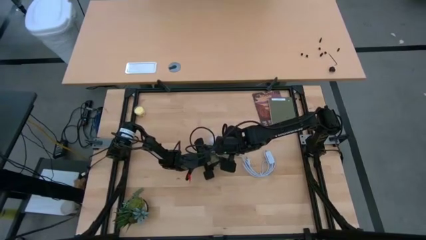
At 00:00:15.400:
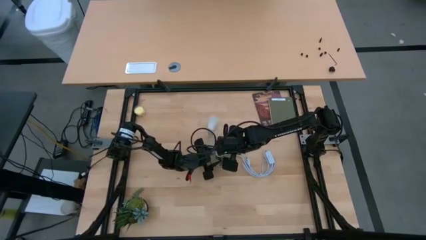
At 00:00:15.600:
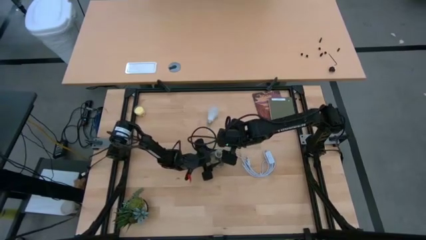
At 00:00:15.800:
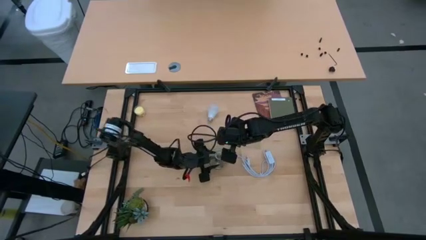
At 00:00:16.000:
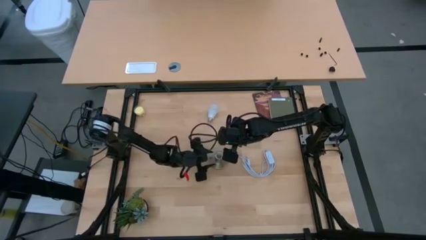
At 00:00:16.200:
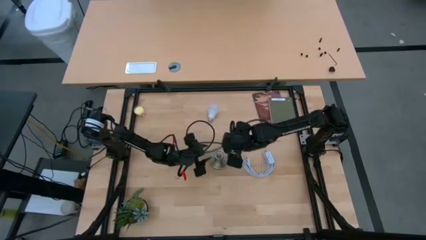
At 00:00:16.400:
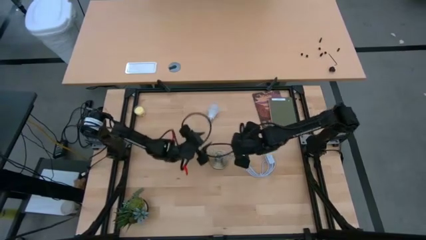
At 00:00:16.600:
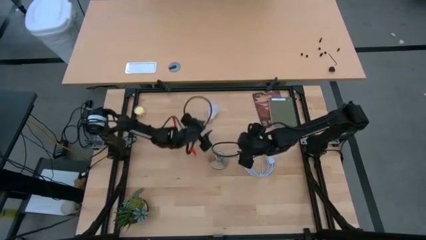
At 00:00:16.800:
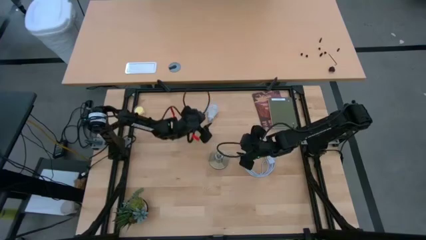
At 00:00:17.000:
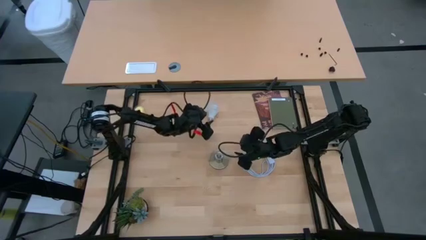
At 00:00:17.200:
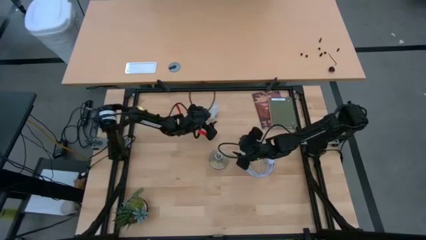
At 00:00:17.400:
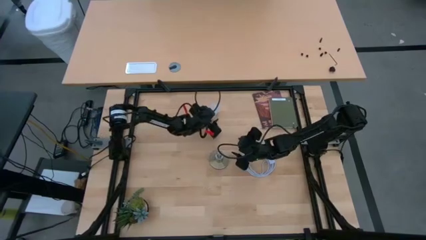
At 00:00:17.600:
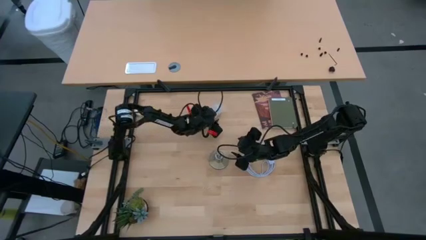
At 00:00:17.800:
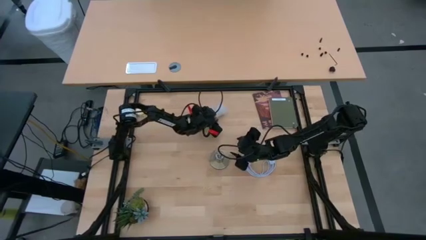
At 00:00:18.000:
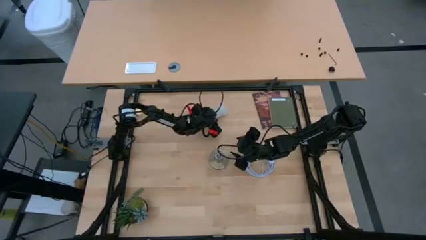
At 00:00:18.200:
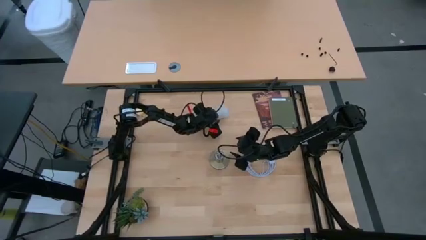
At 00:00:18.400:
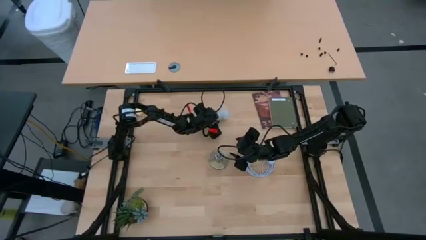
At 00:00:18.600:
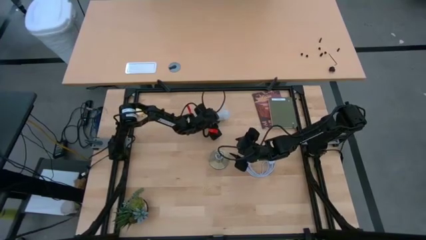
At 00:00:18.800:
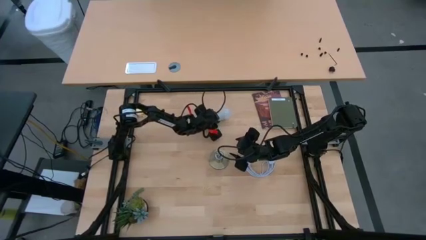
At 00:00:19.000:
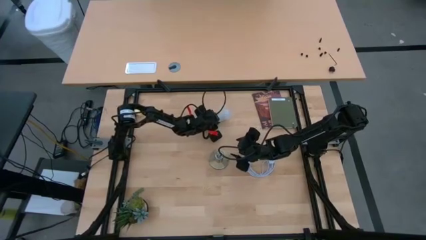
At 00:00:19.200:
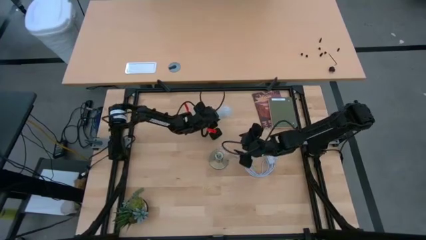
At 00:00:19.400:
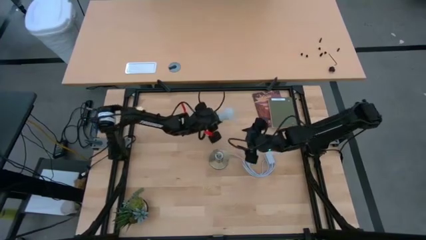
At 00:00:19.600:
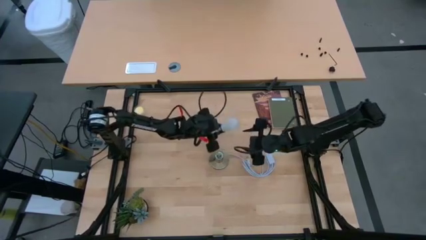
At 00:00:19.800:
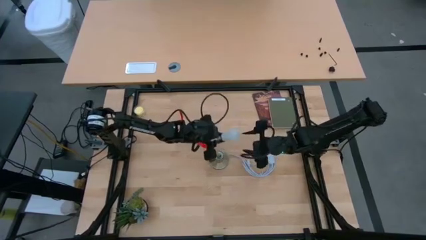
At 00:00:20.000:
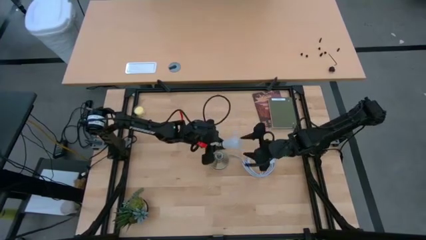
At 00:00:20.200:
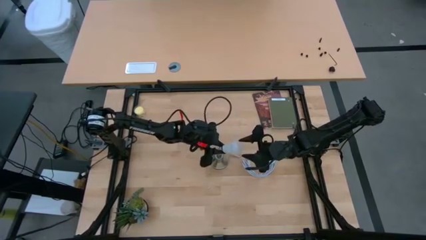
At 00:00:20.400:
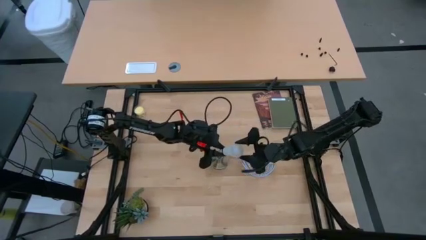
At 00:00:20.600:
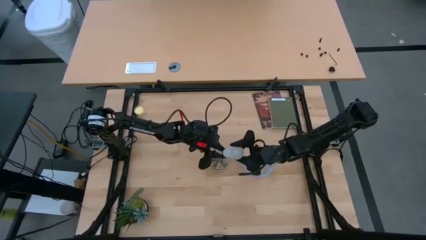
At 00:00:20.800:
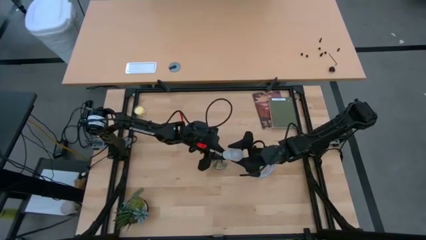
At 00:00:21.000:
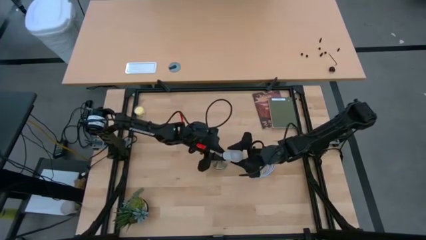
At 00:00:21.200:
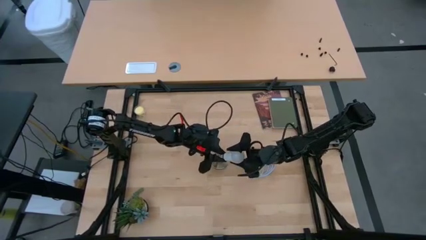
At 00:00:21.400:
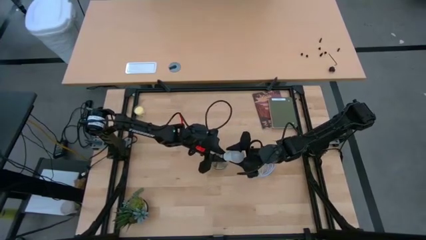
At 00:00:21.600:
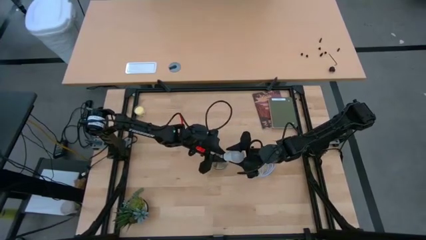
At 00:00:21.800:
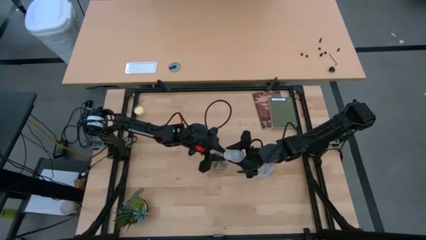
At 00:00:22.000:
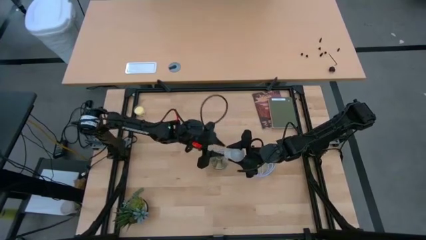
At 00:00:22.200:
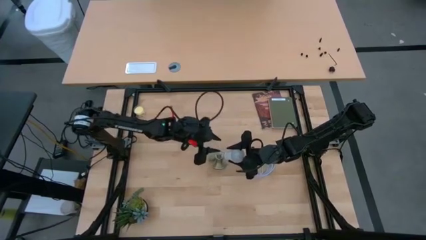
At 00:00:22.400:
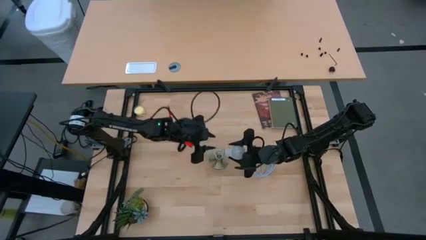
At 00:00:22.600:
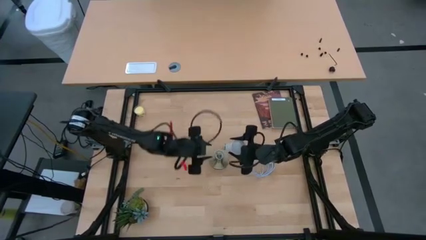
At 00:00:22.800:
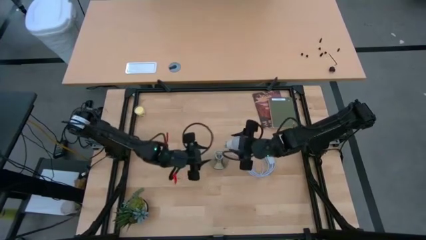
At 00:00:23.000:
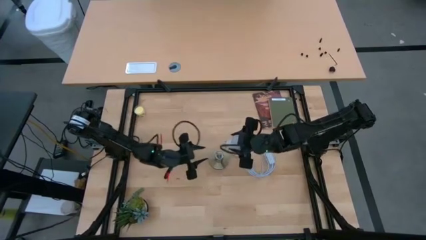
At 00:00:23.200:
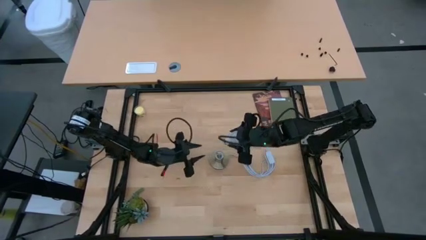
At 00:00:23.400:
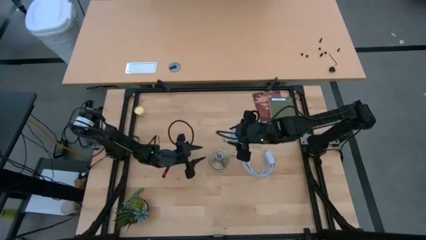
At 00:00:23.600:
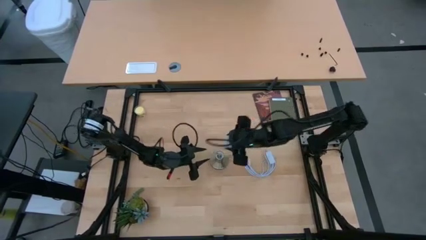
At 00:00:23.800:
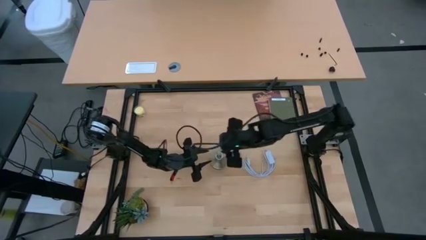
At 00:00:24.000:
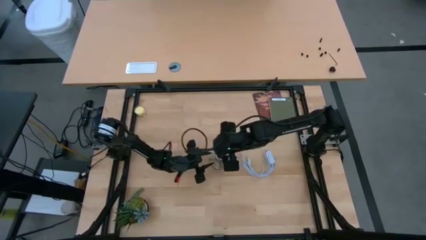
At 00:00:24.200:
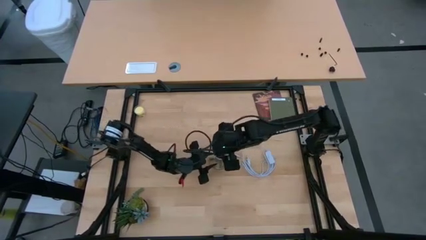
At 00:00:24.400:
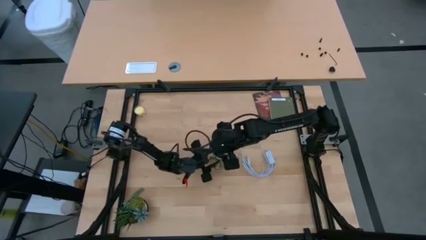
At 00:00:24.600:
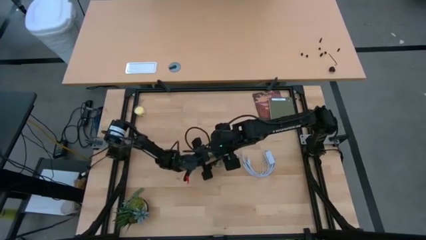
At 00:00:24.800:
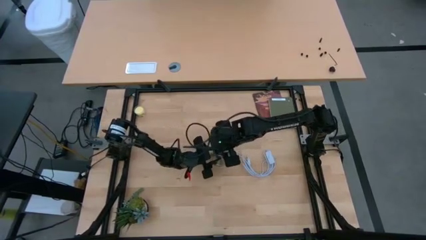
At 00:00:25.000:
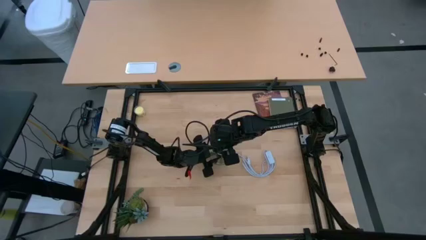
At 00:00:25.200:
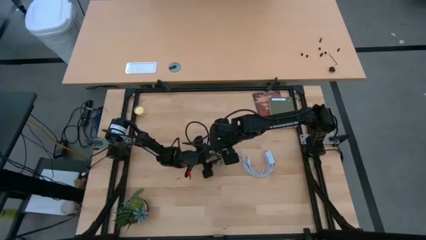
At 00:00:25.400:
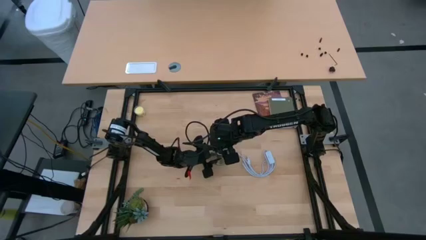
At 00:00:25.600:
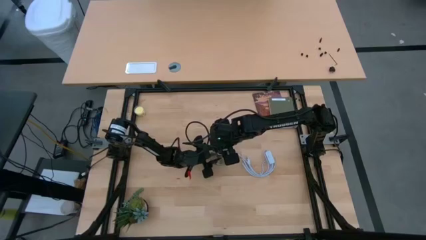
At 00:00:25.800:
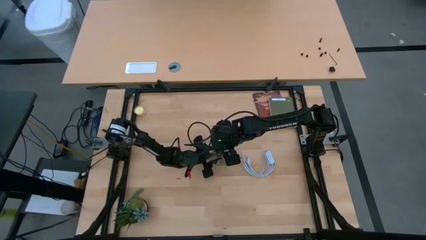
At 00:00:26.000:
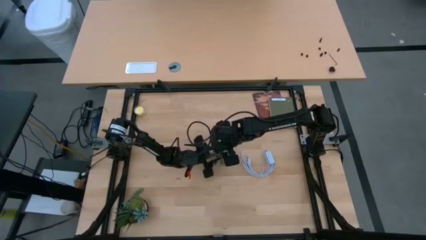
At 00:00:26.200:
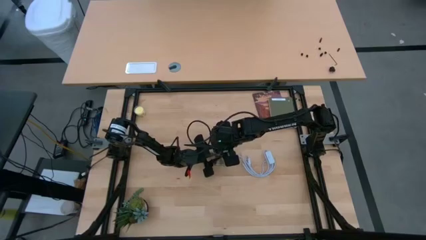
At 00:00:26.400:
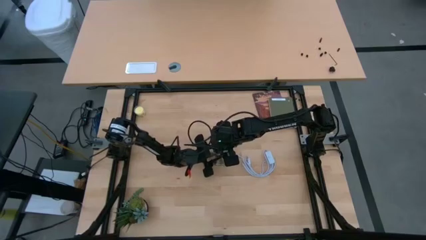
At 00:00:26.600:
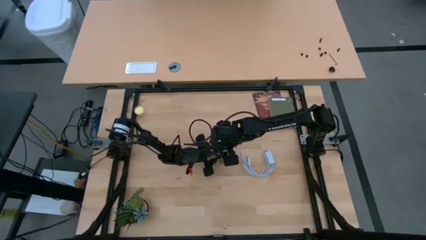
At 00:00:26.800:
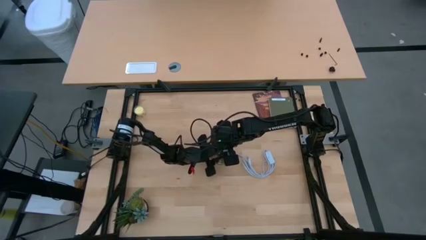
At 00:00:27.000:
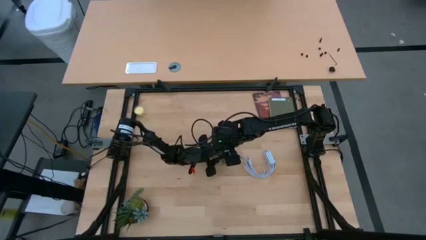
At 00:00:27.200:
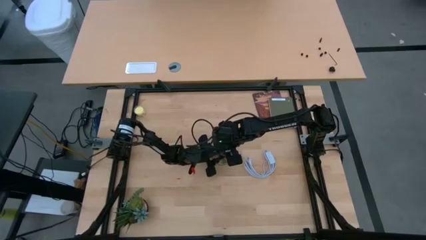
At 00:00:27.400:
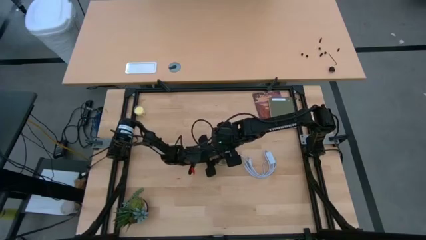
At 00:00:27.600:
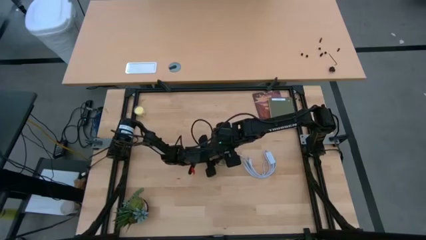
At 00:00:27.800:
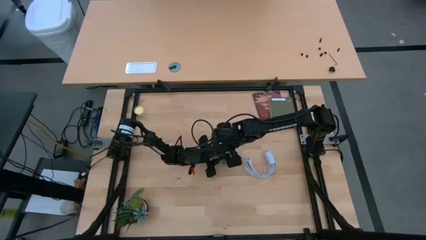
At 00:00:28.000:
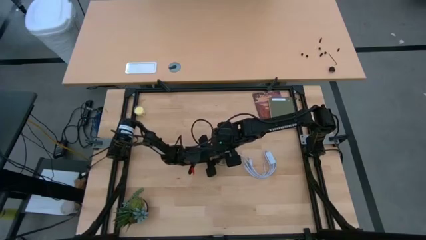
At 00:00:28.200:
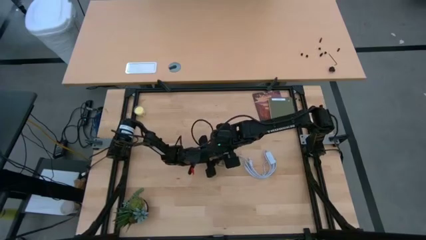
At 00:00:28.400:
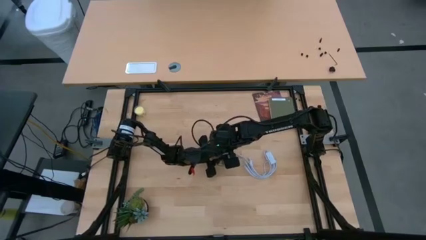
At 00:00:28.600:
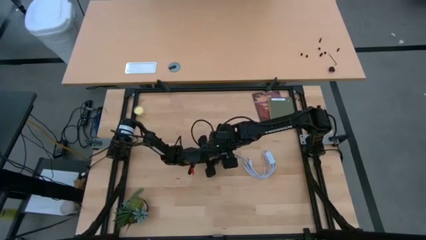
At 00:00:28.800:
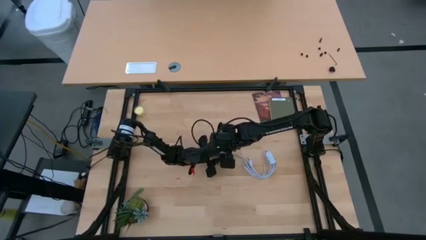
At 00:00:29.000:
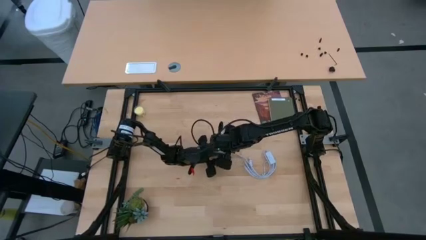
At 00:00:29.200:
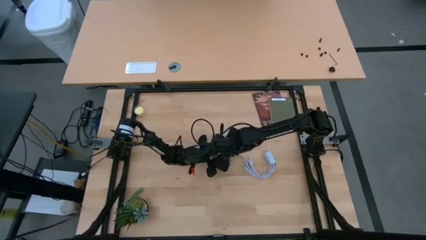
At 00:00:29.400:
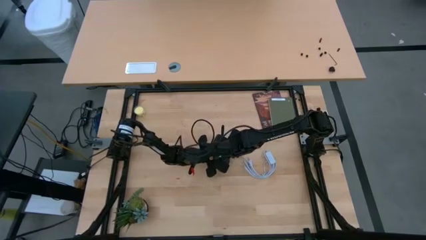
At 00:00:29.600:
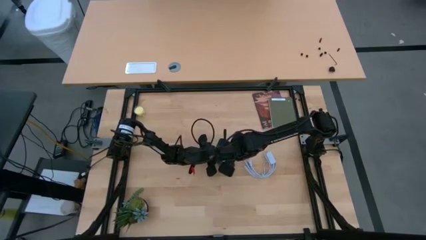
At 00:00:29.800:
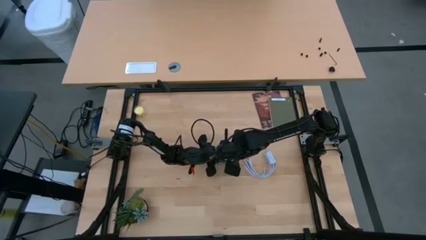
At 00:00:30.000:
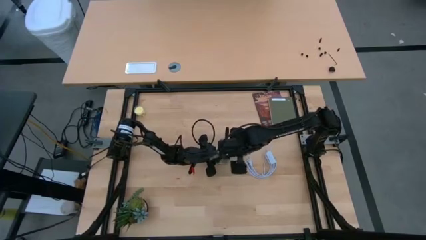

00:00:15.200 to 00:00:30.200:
Task: Screw lightbulb
Insert the light bulb into the lamp
